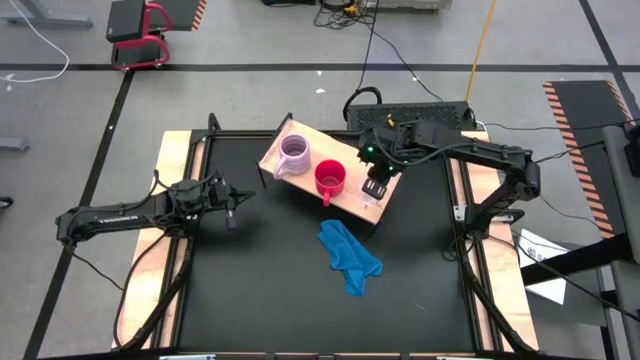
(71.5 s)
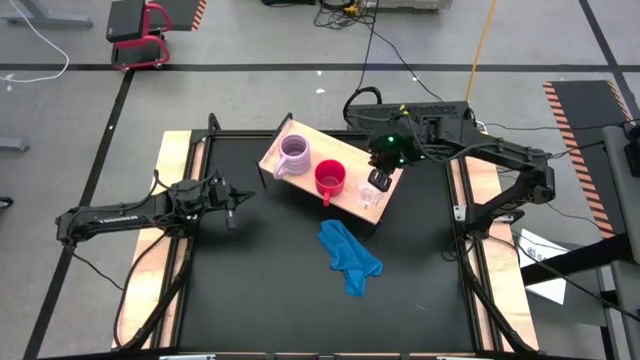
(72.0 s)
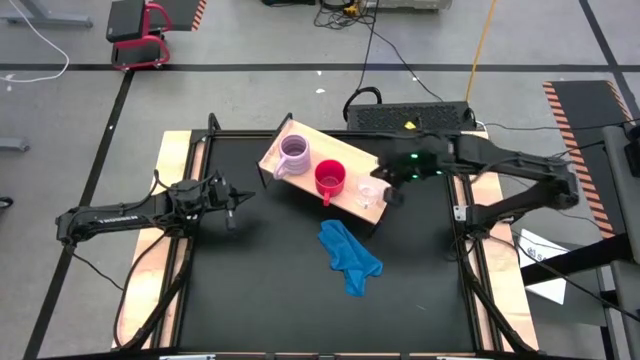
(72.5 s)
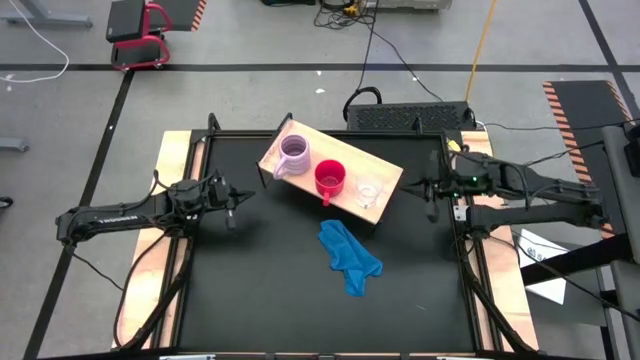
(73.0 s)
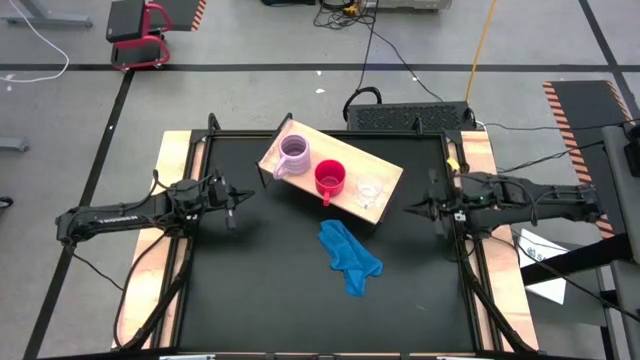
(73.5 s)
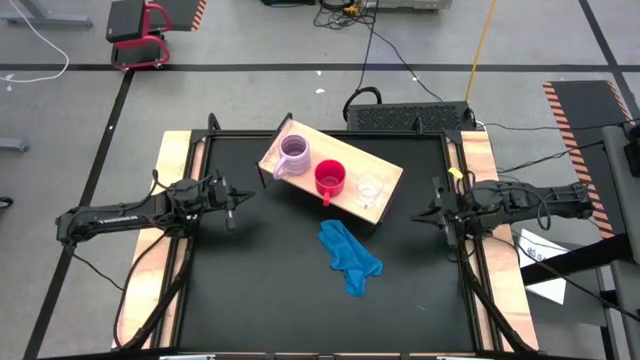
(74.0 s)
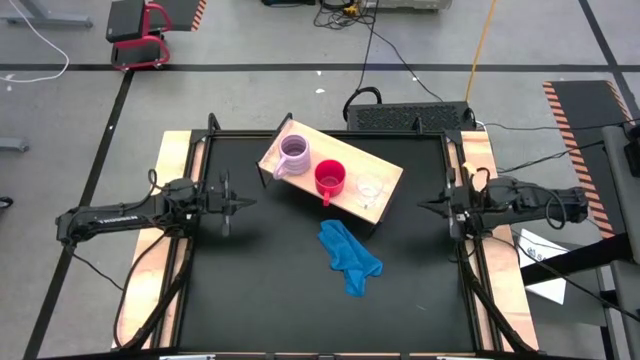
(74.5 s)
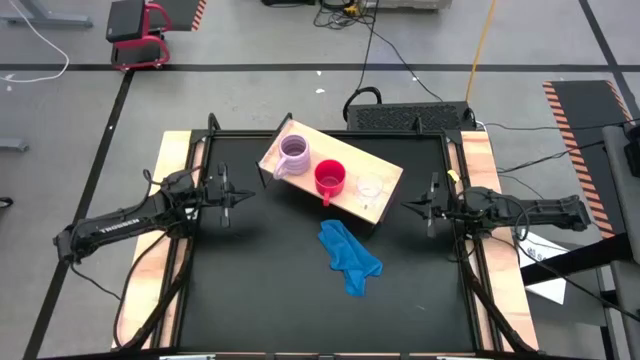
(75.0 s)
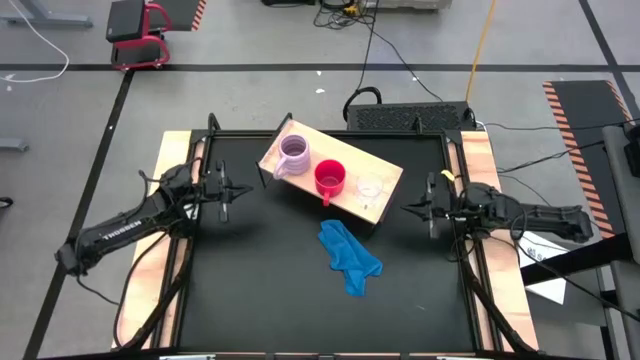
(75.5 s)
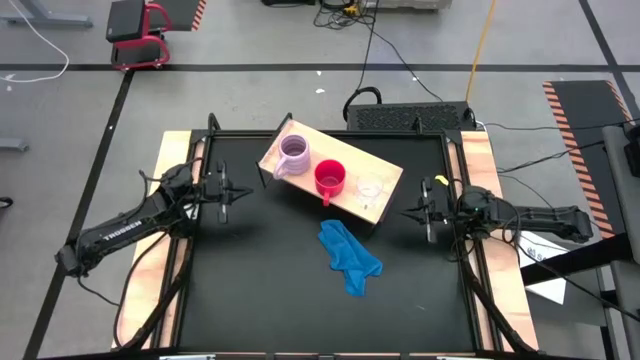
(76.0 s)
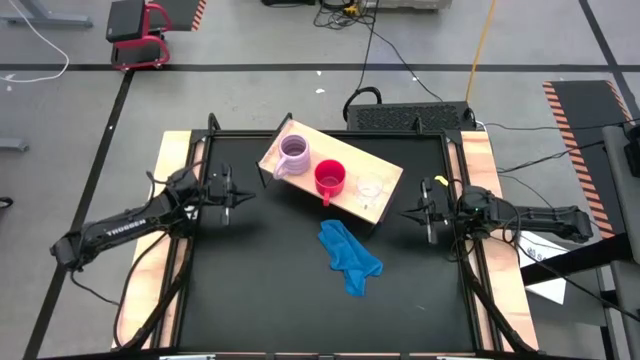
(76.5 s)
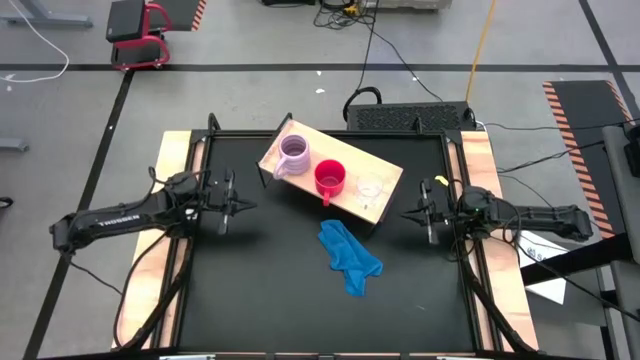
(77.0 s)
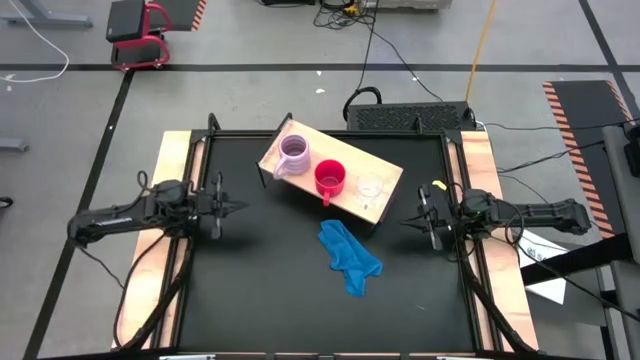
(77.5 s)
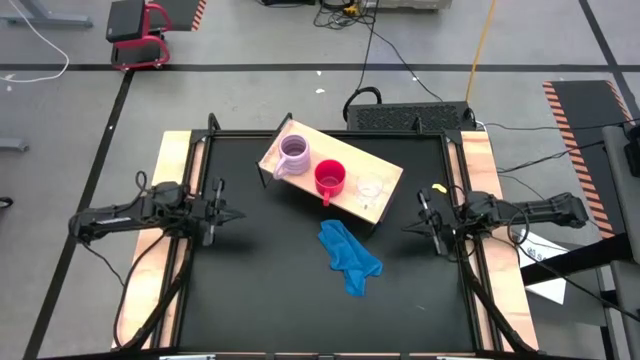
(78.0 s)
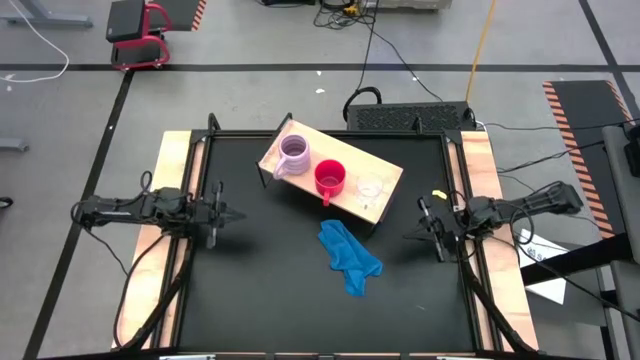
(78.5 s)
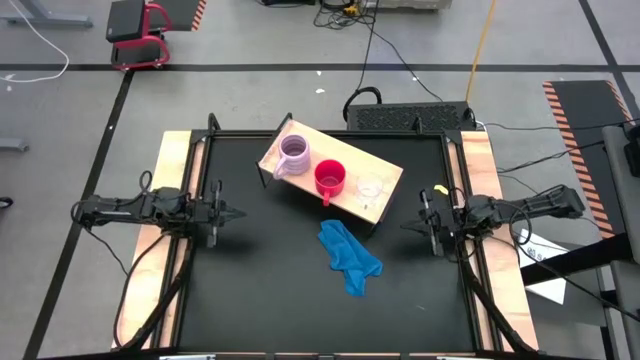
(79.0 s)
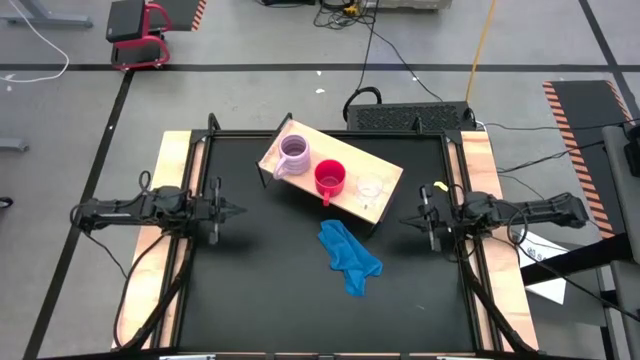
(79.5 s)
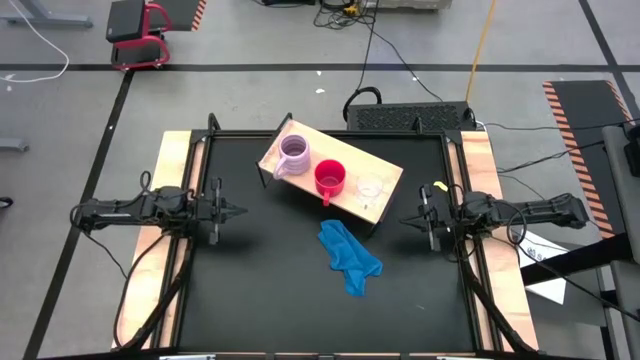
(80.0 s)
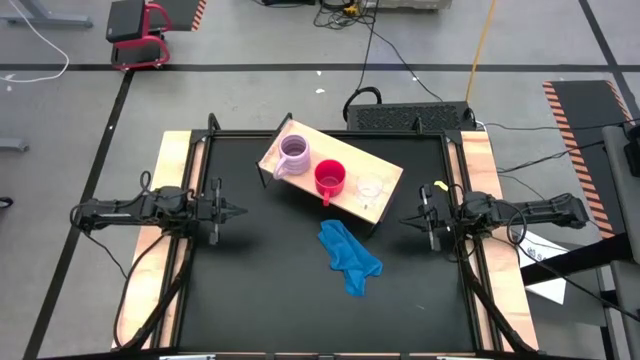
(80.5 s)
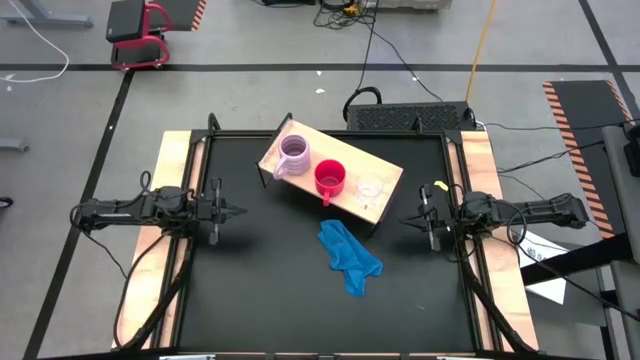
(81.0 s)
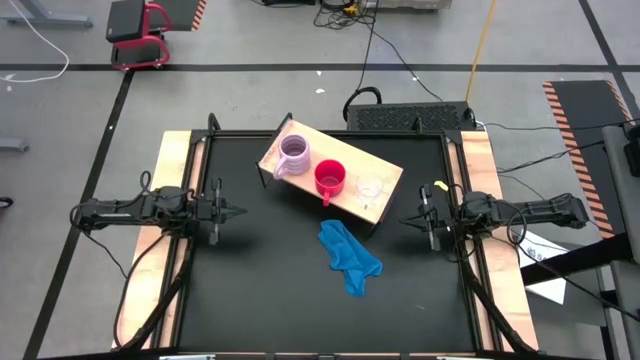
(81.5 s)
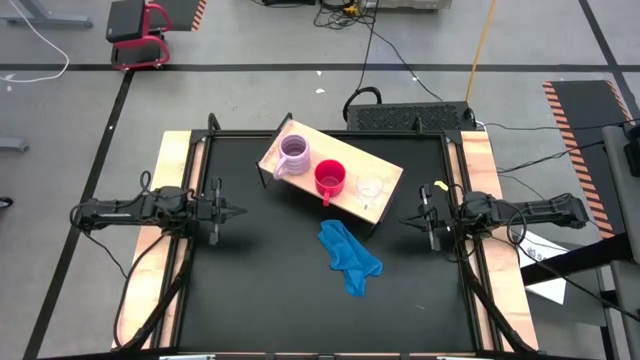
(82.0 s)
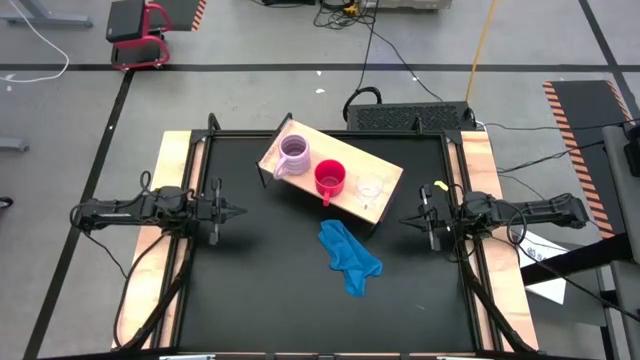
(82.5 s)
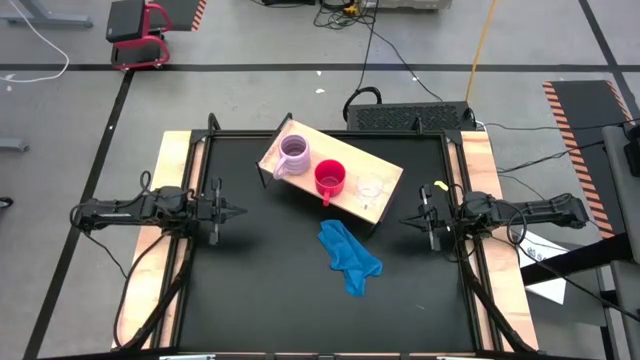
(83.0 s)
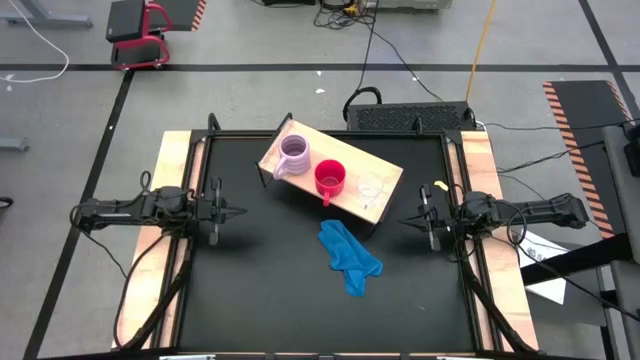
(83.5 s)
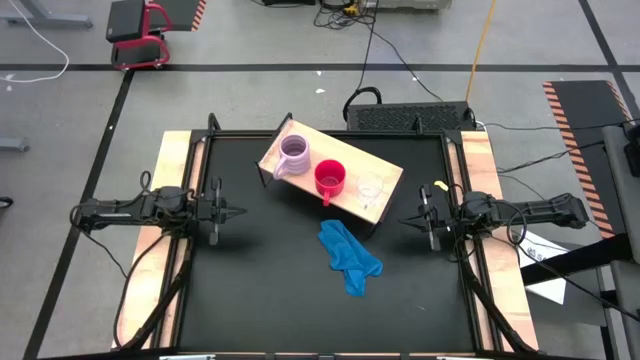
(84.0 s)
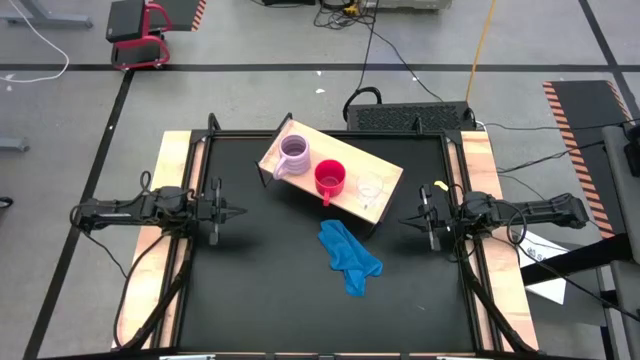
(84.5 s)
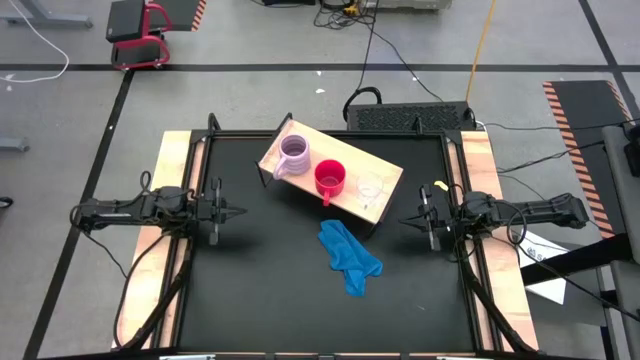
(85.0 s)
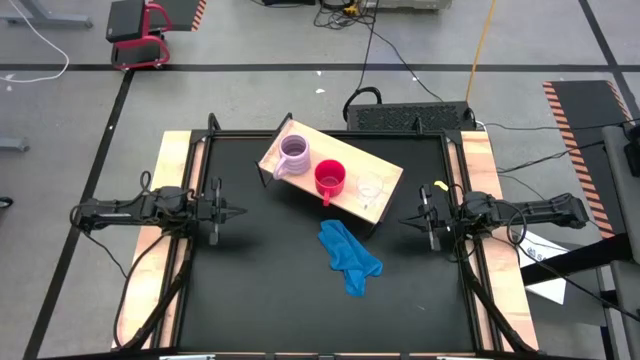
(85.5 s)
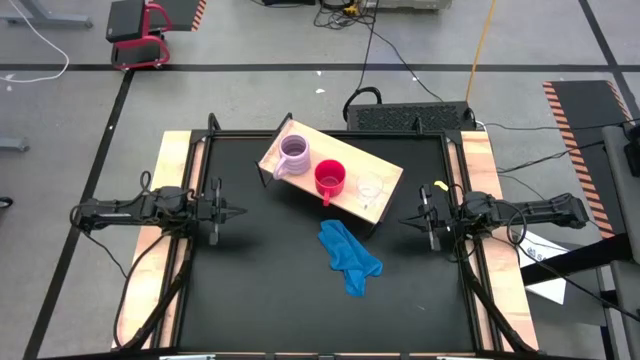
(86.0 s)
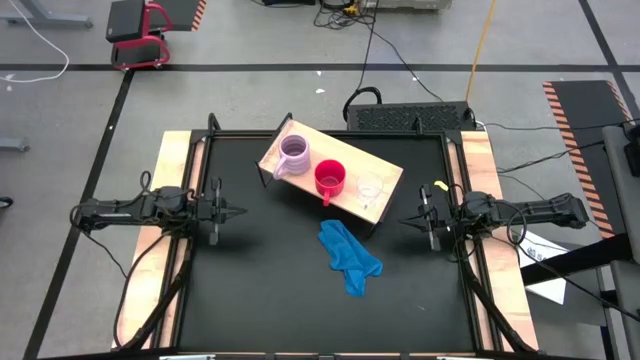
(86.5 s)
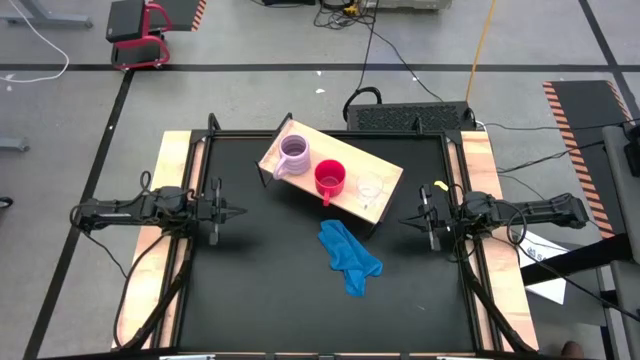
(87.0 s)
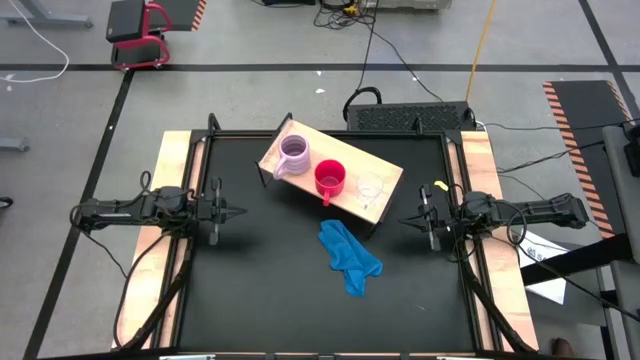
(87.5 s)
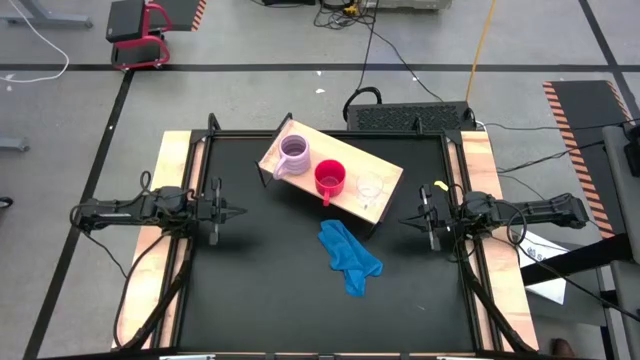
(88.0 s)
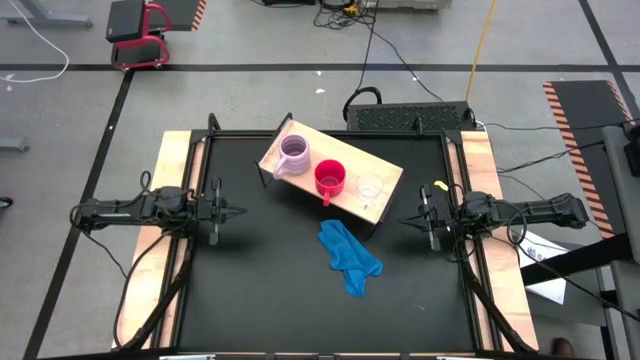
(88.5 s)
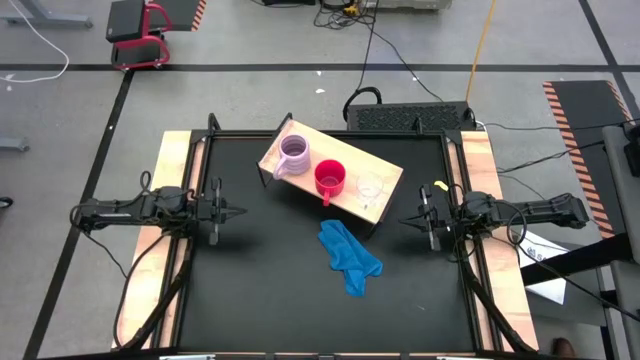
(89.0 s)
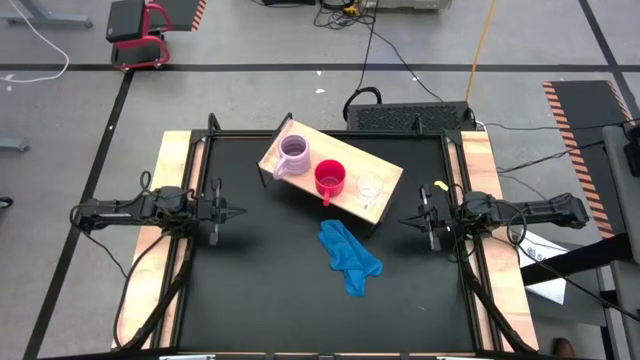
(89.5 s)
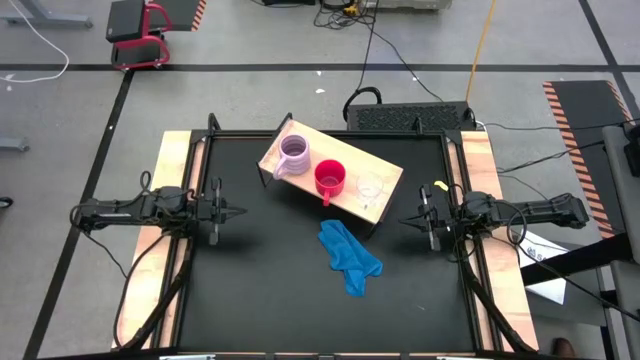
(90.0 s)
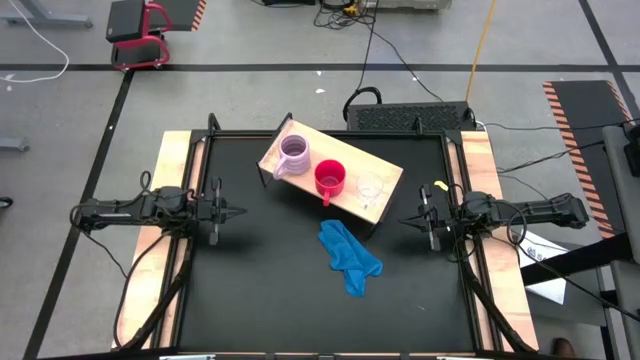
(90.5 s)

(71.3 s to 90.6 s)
Task: Stack small to large cups/mugs on shelf
Return to Home Position

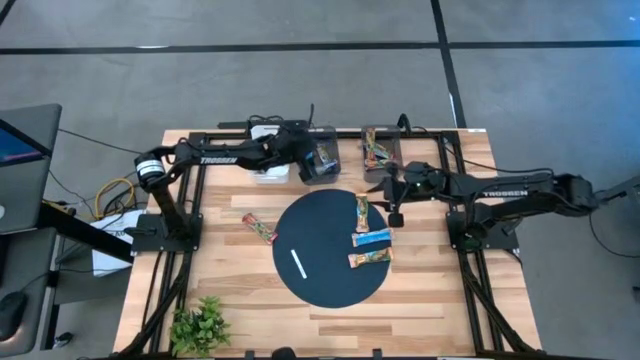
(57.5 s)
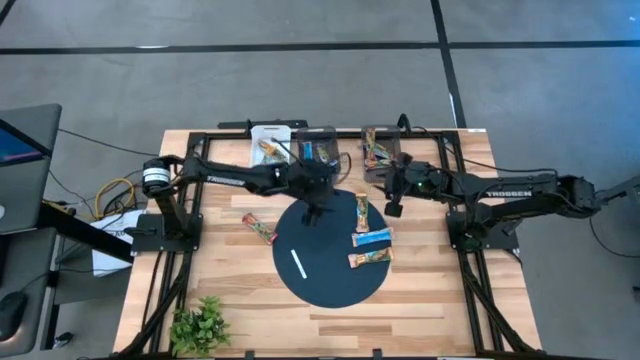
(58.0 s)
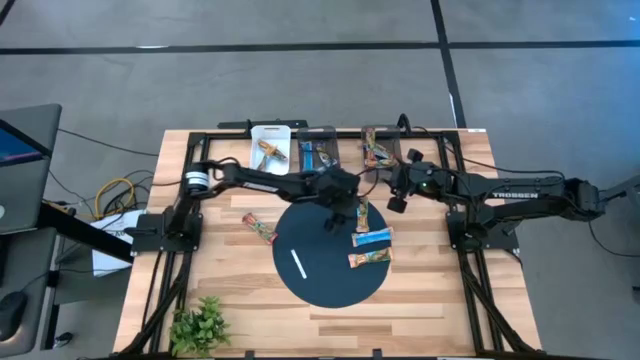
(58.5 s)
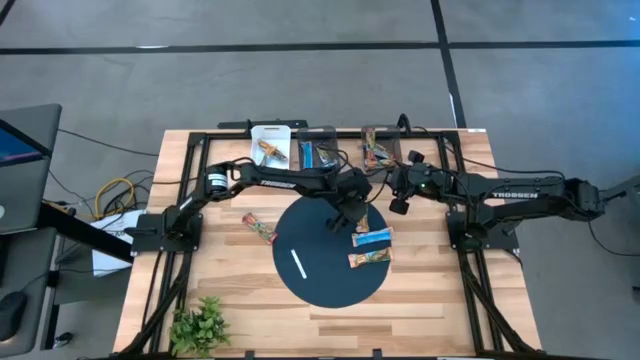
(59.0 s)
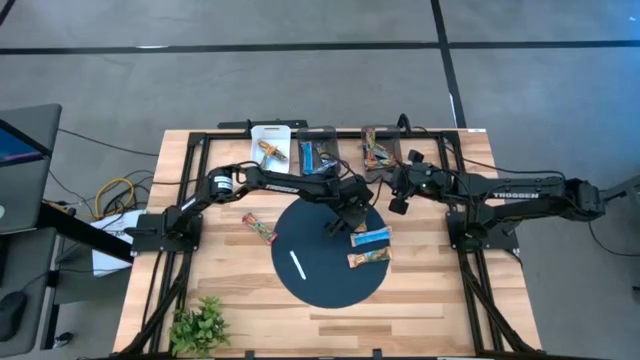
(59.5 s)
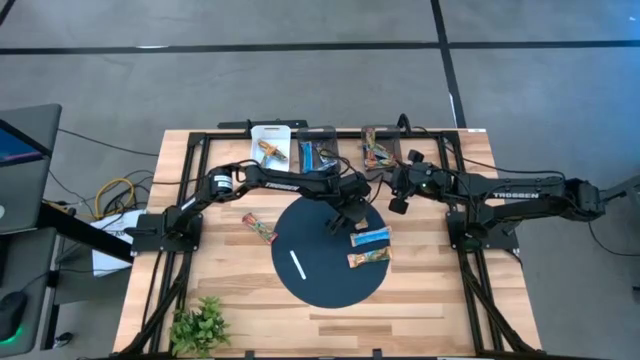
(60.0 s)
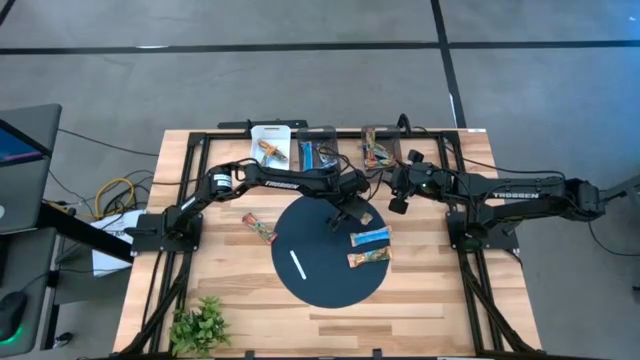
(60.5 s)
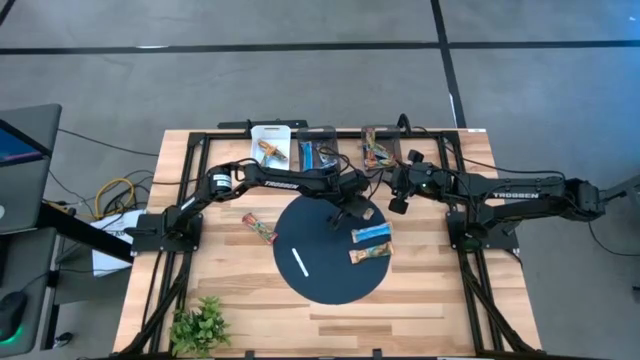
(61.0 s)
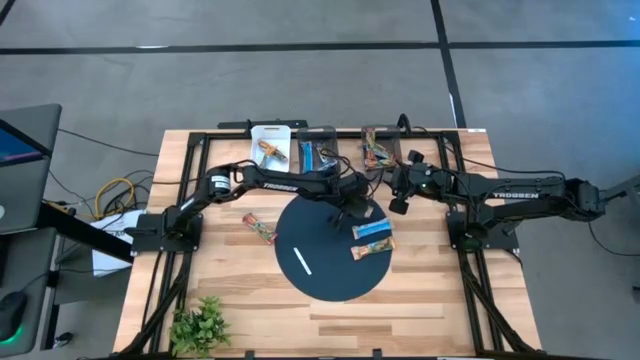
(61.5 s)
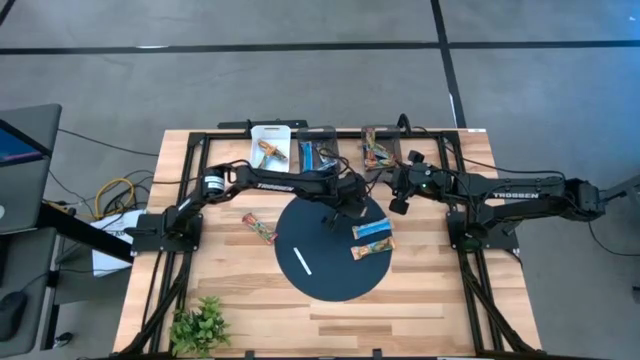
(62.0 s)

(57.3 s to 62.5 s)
Task: Pick and place Granola Bars by type
Put the orange granola bar into the white bin
